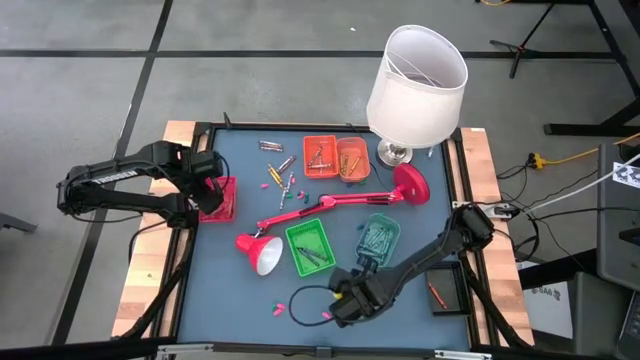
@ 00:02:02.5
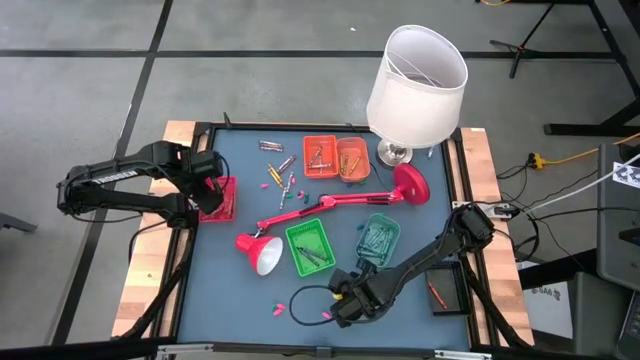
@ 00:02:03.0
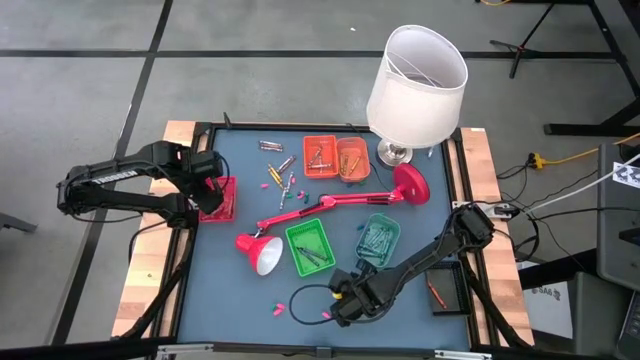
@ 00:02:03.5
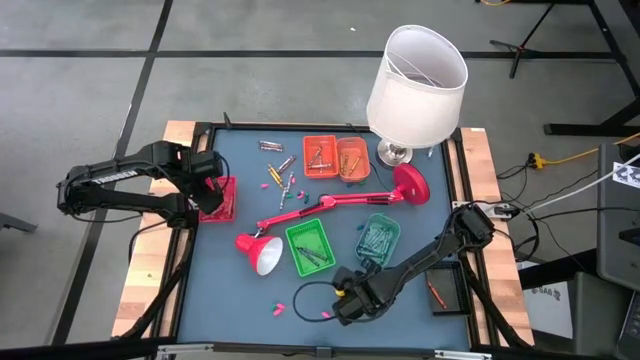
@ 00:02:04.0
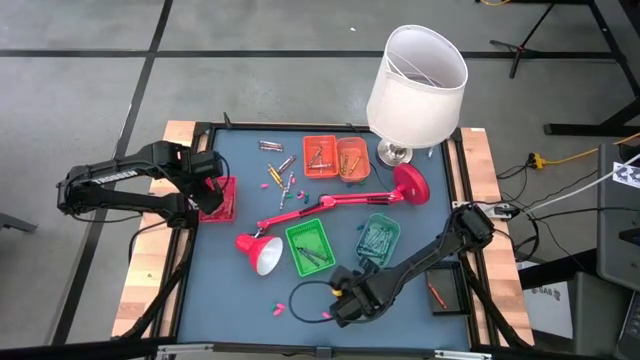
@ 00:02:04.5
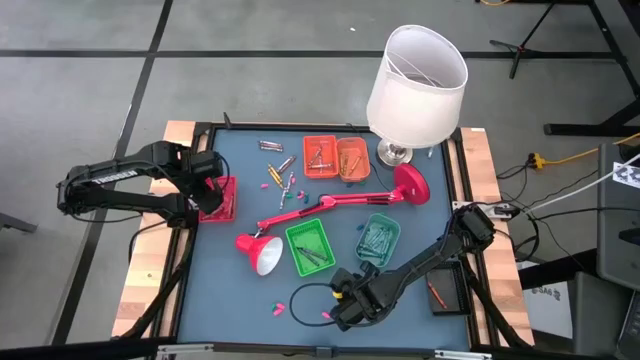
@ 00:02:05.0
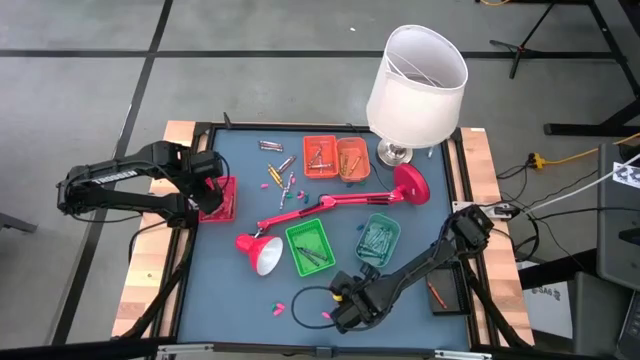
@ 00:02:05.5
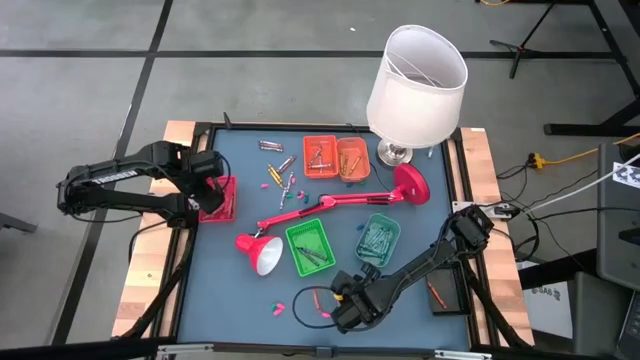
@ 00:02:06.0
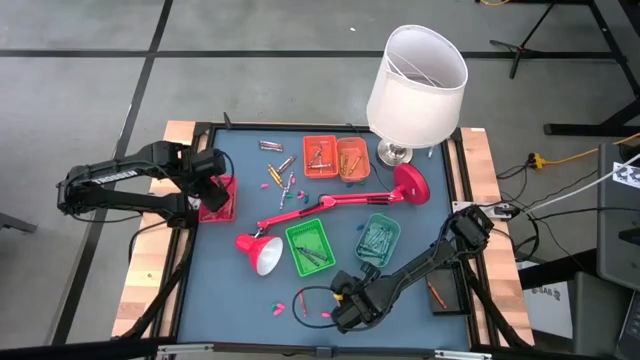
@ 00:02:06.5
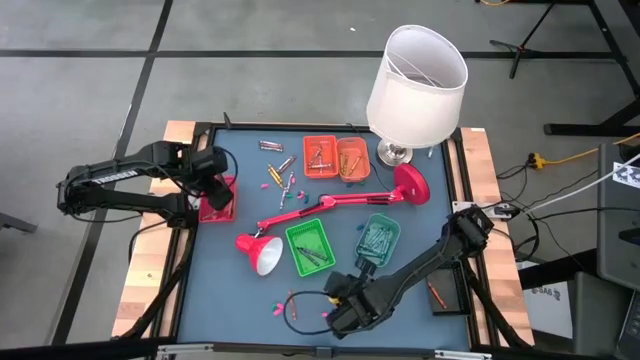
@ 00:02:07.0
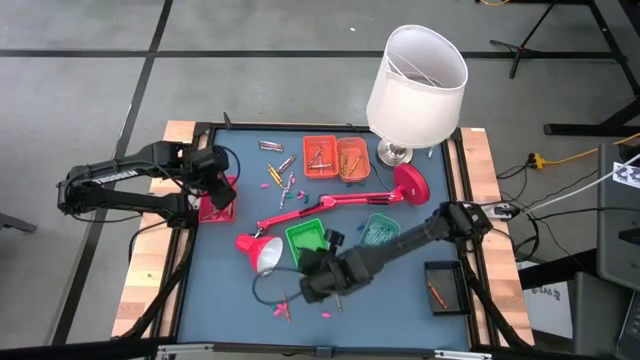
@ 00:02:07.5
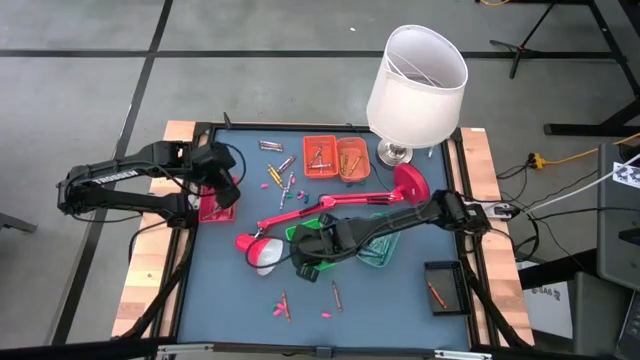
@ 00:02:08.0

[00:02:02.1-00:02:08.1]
Task: Sort crayons
Put the violet crayon into the green bin

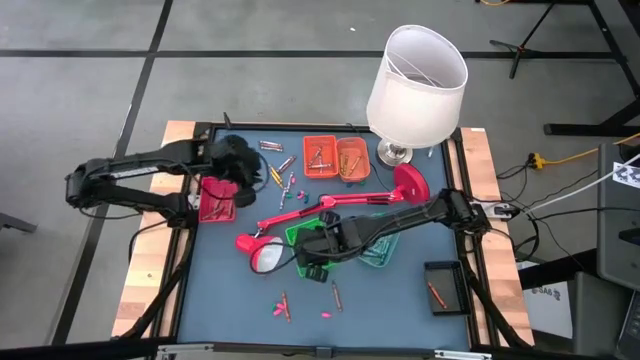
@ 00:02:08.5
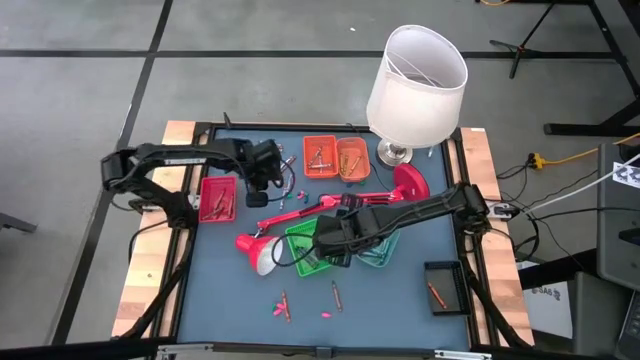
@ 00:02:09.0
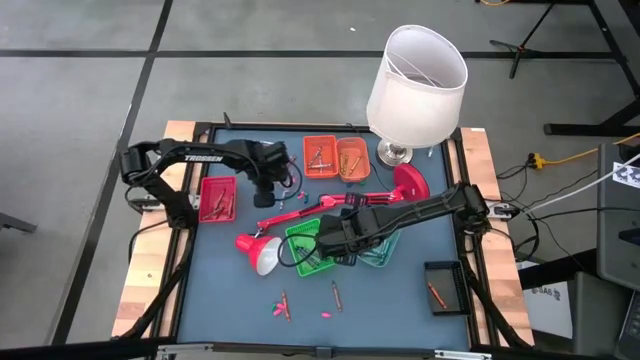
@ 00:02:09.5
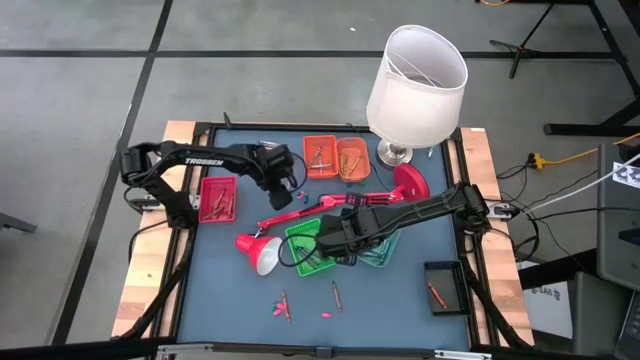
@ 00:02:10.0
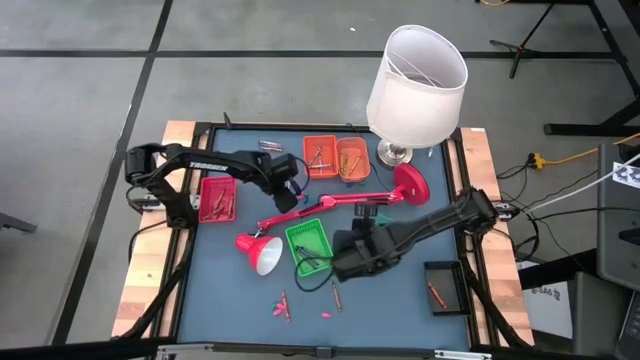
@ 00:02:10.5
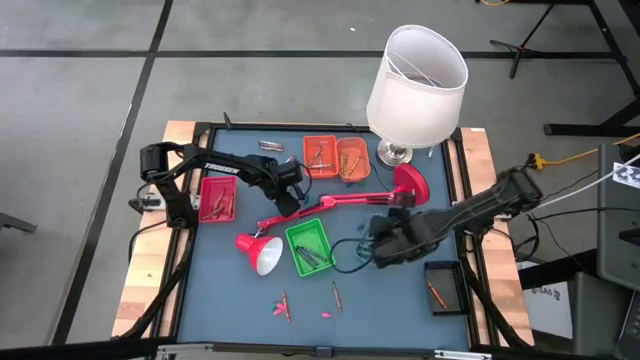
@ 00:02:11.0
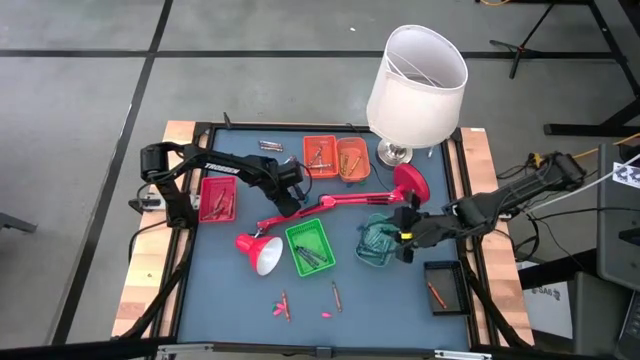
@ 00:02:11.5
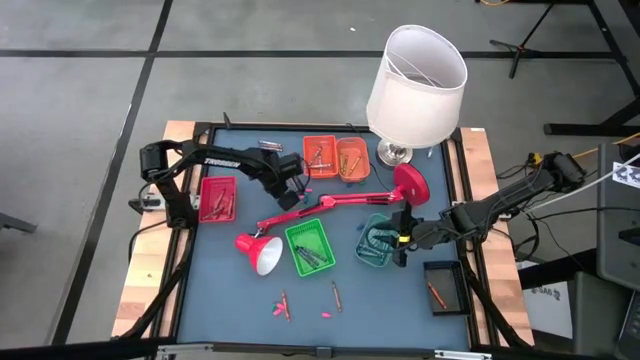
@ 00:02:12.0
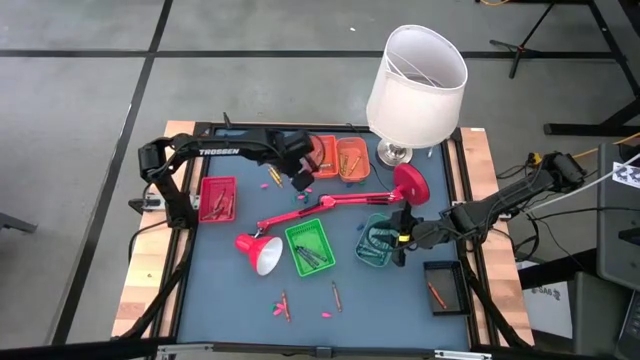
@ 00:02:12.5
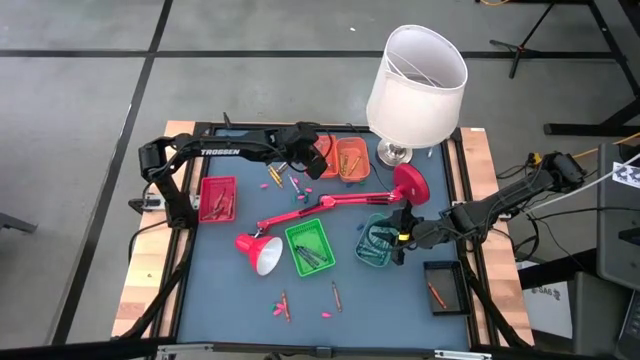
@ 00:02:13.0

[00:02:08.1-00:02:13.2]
Put the gray crayon into the orange bin

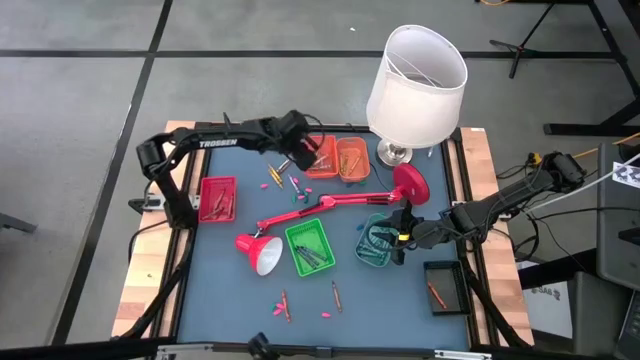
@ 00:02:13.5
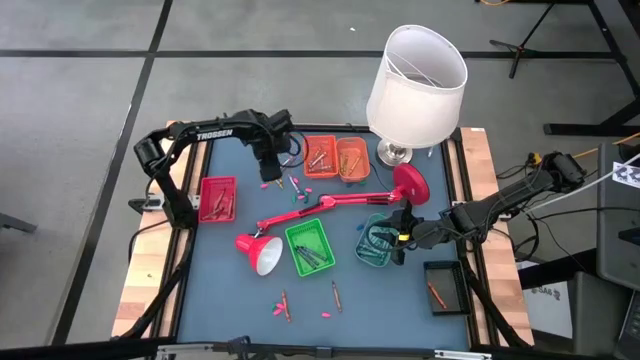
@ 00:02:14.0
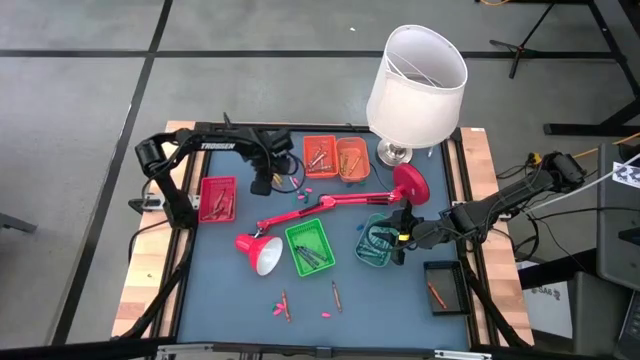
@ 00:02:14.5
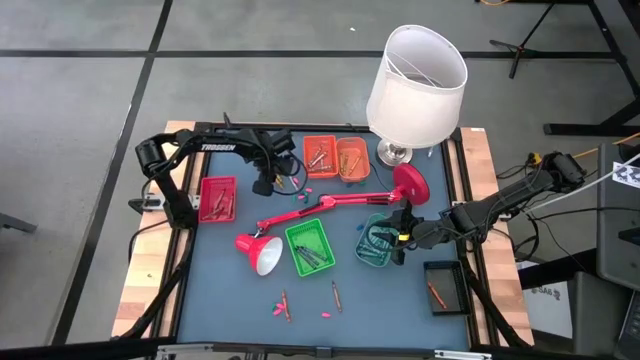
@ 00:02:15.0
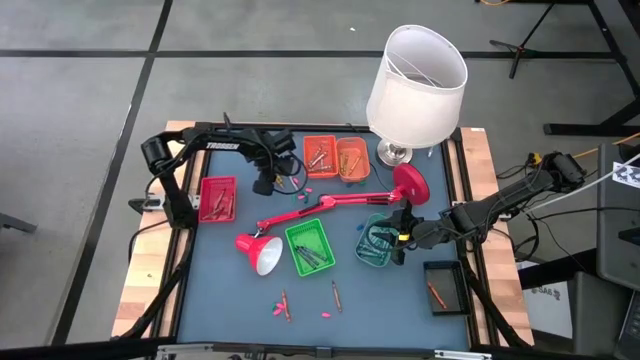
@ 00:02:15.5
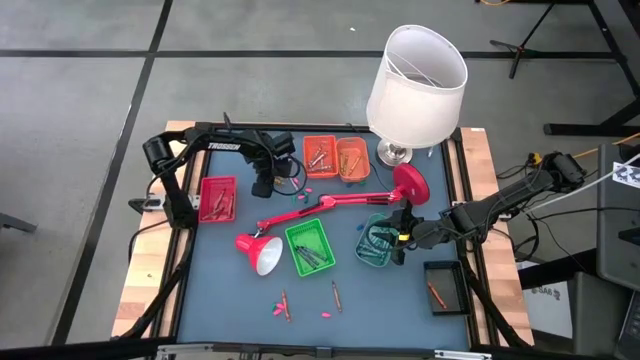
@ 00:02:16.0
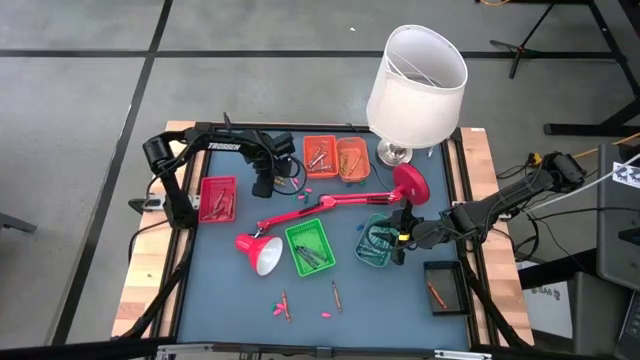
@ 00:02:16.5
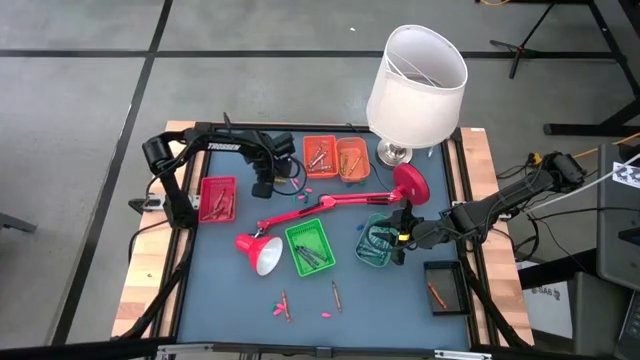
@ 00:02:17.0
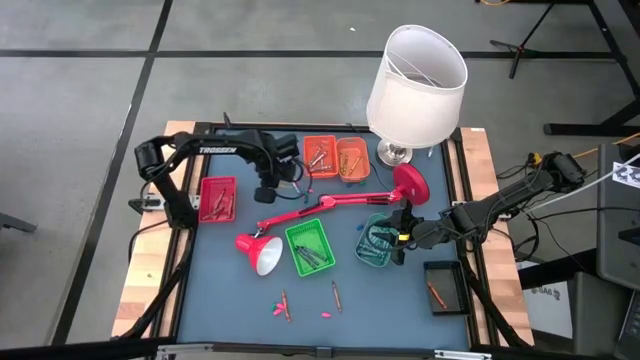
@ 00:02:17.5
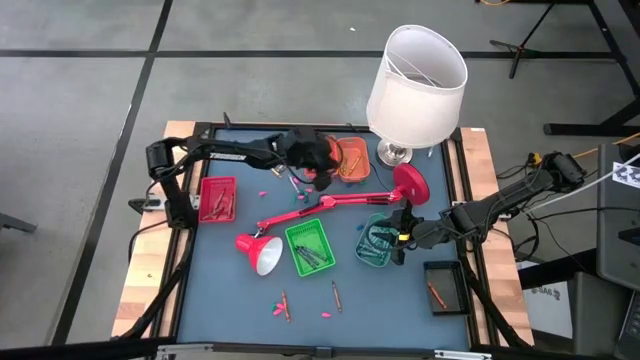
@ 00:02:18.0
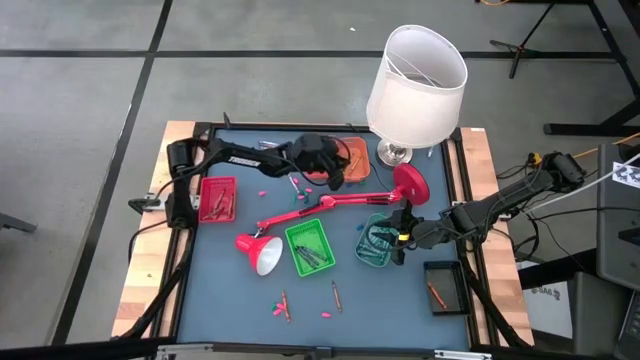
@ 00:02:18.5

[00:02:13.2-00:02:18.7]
Put the yellow crayon into the light orange bin

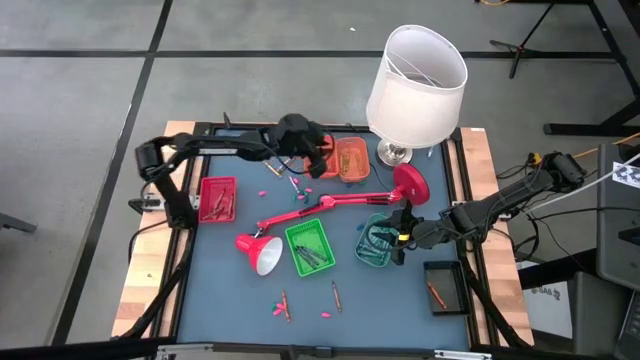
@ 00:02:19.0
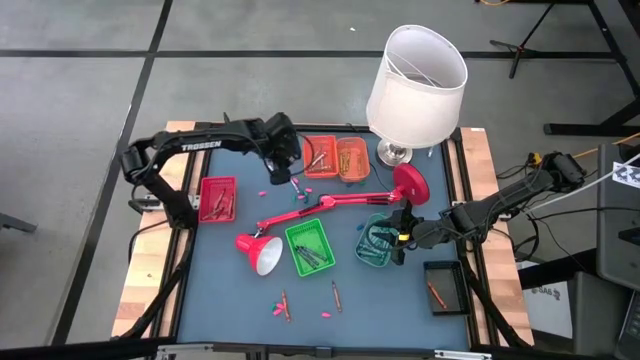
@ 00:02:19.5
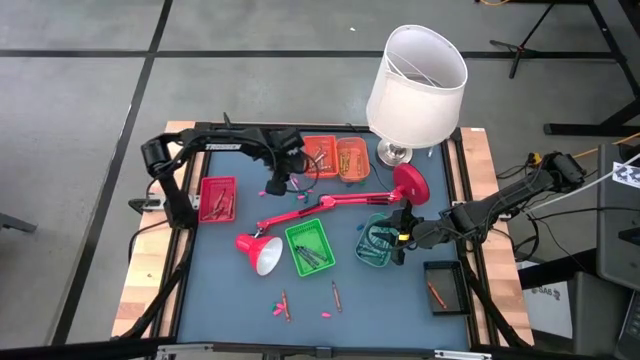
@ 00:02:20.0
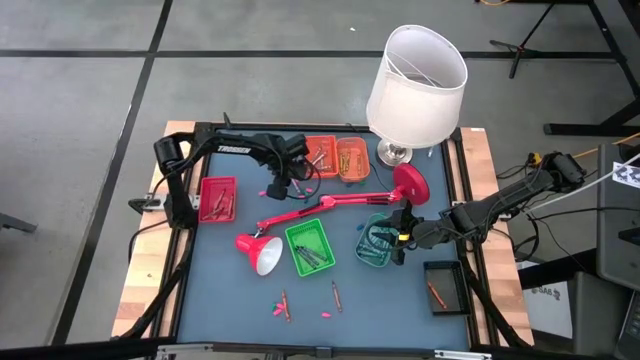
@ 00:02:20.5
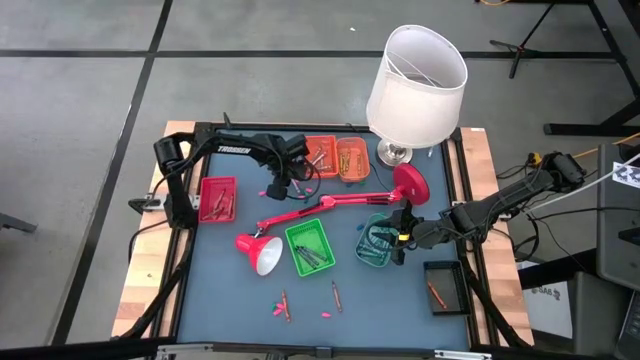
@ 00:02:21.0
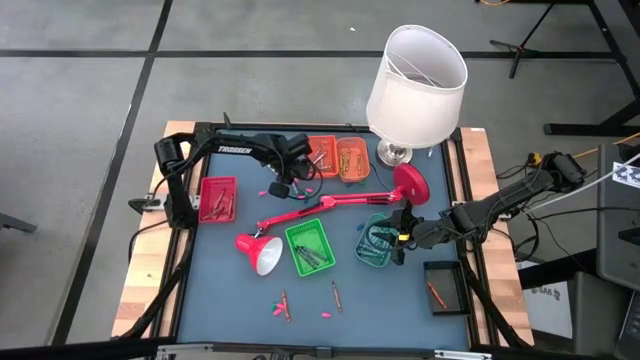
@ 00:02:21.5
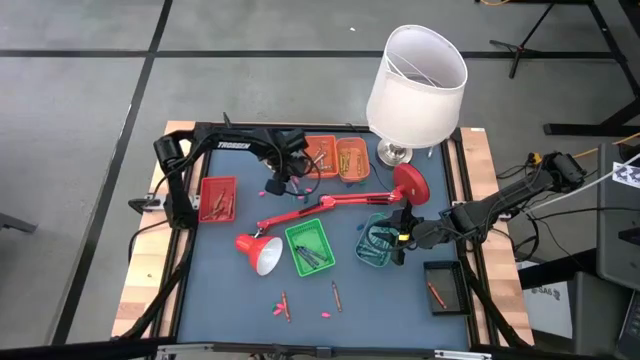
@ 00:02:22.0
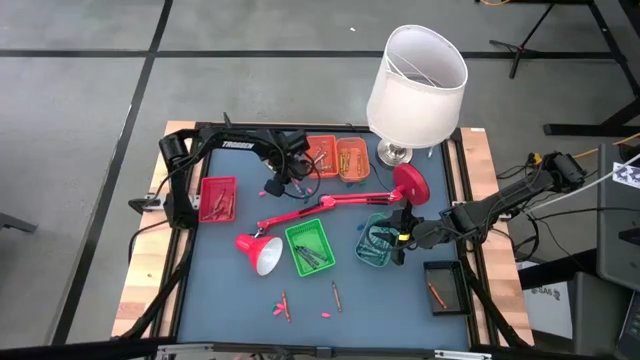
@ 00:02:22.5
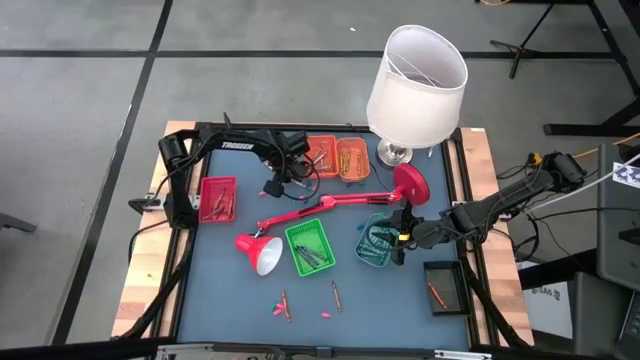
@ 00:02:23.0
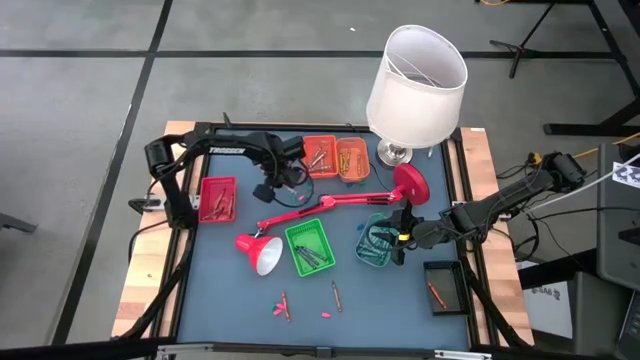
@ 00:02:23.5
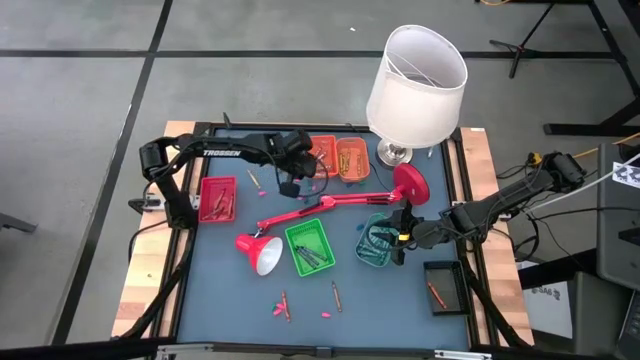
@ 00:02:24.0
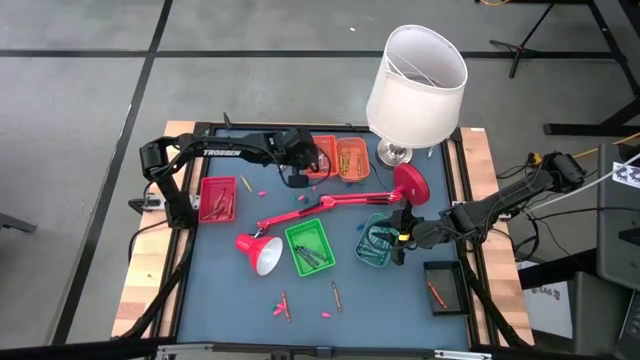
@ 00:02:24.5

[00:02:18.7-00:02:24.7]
Put the gray crayon into the orange bin
